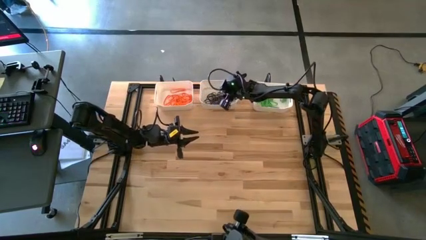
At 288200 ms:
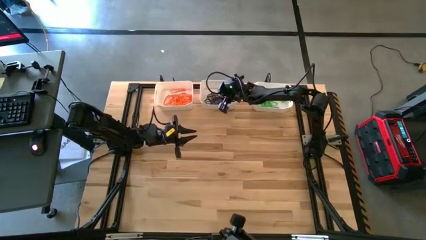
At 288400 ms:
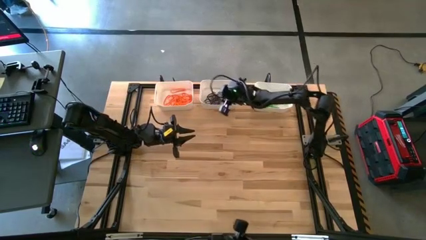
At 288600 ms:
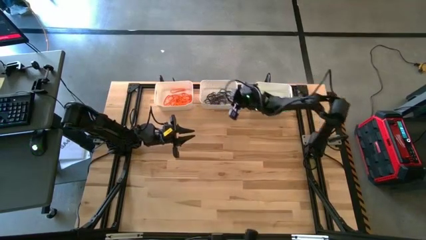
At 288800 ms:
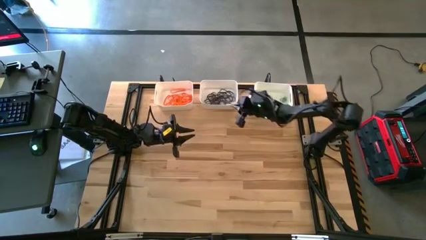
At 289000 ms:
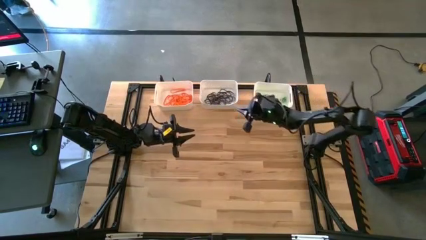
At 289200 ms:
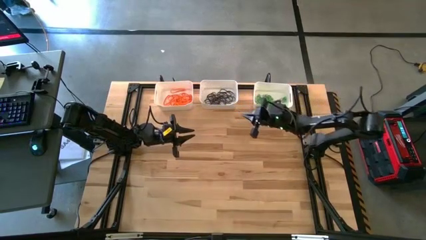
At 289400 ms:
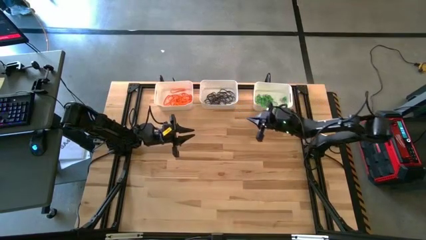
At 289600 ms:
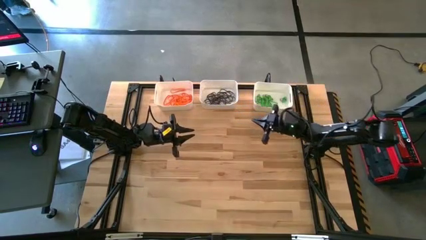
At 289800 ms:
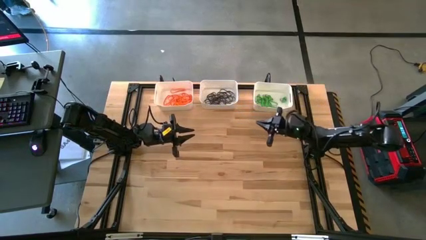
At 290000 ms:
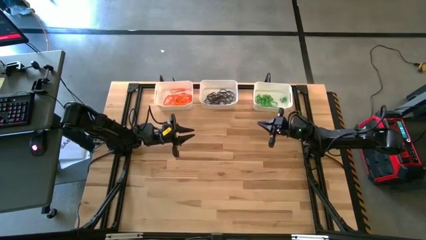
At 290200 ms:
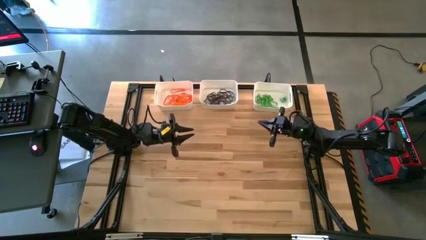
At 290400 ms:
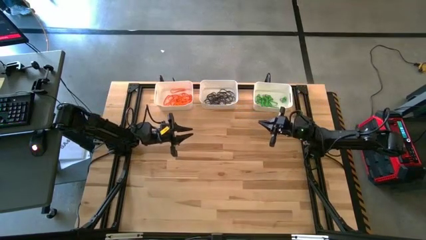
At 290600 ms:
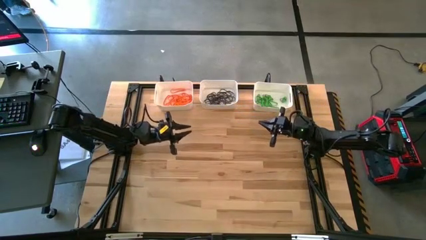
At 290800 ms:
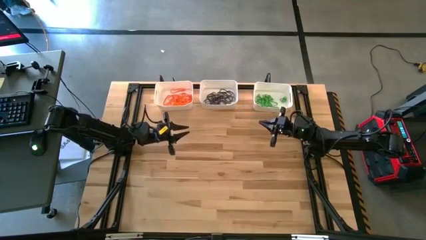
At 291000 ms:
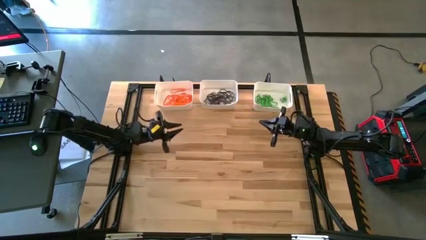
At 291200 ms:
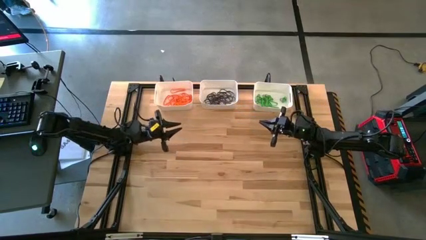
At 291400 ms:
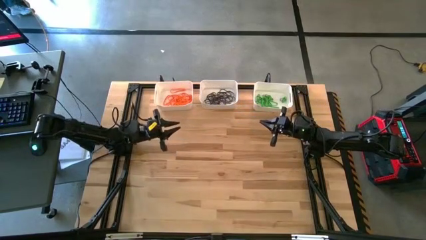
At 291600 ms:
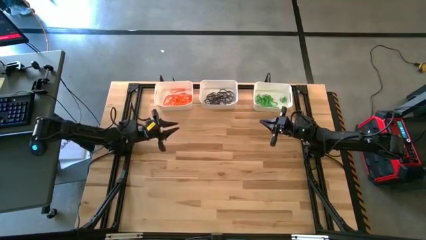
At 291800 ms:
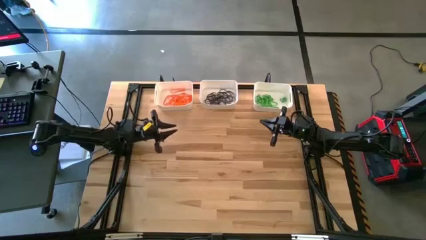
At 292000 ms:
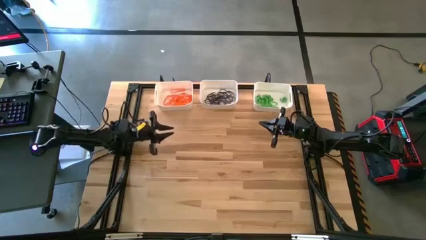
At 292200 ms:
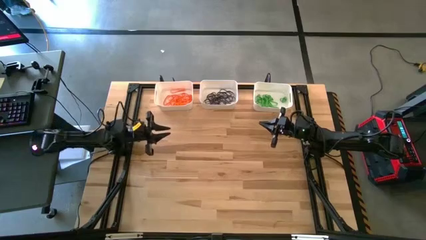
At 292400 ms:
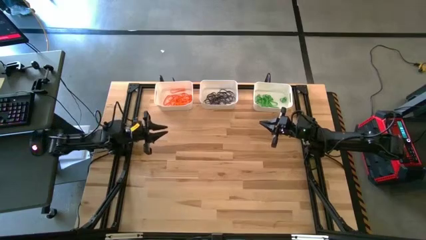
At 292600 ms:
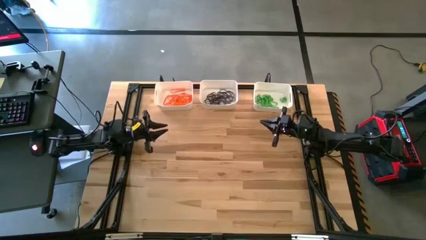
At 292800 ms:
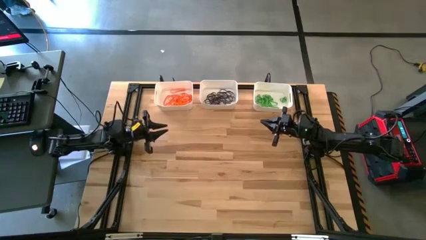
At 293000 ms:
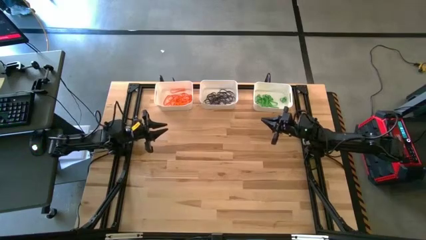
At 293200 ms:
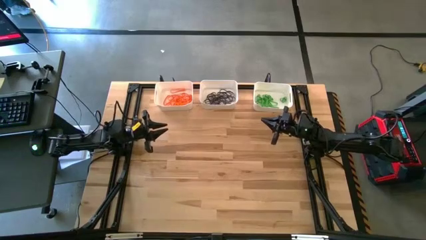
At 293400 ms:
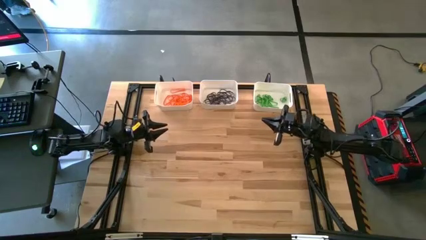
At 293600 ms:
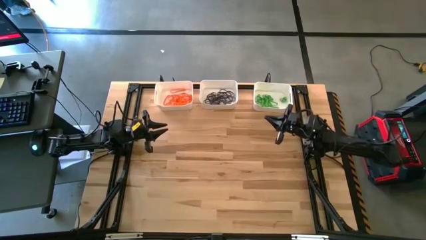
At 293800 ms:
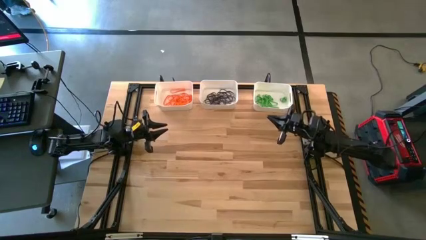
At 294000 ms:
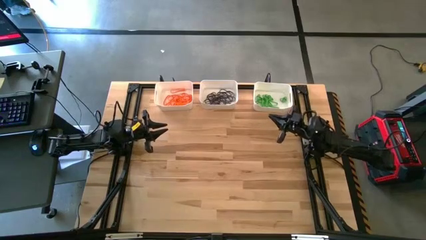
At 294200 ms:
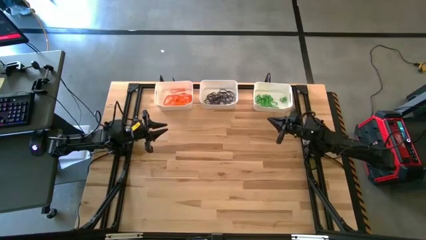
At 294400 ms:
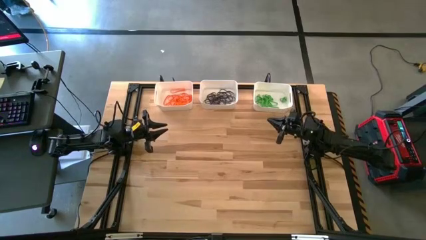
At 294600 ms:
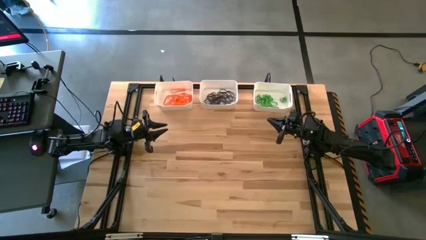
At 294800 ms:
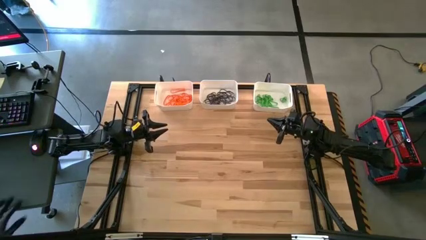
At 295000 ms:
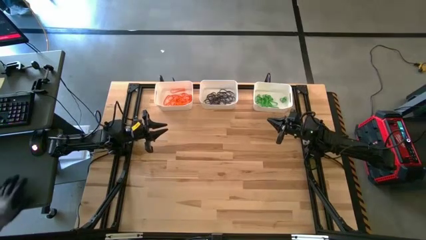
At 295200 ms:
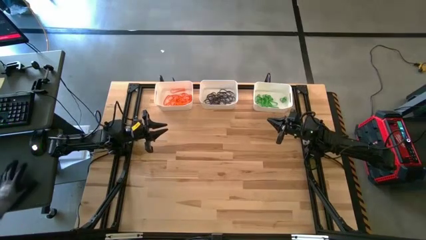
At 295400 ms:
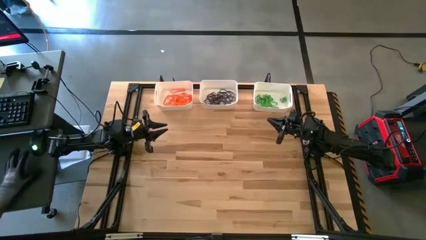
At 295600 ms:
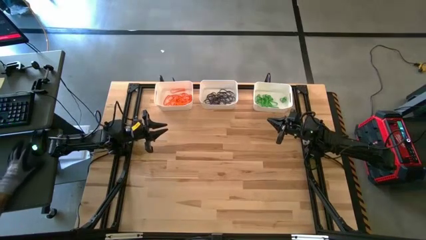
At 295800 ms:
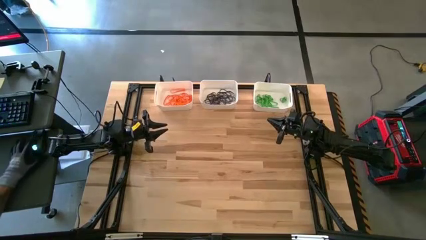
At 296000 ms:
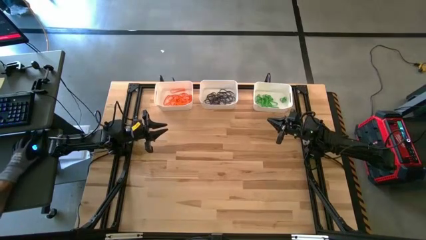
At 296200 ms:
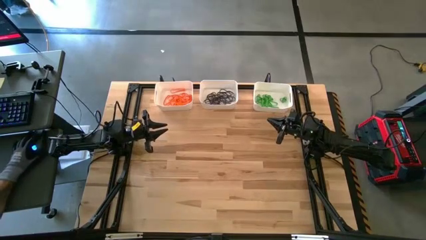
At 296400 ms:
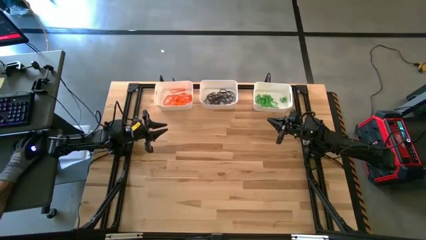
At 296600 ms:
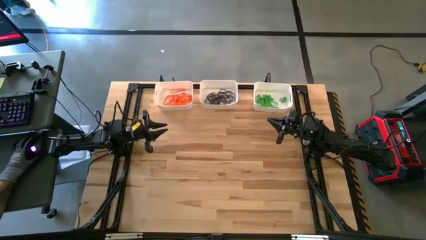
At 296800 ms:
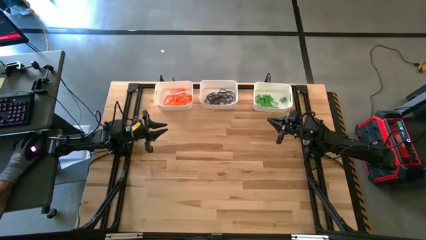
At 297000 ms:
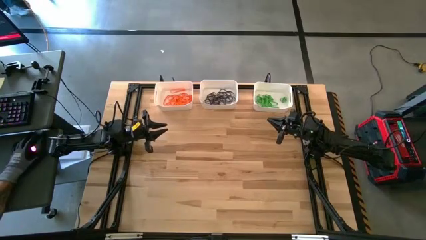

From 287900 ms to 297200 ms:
Task: Sort rubber bands into baskets
Return to Home Position

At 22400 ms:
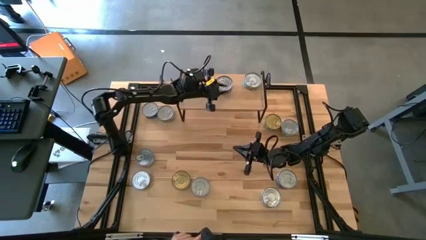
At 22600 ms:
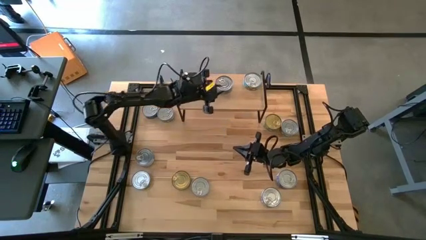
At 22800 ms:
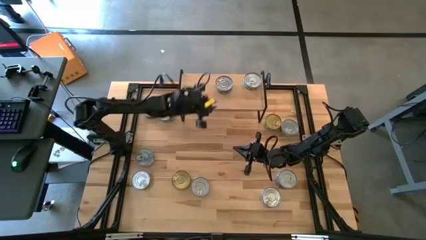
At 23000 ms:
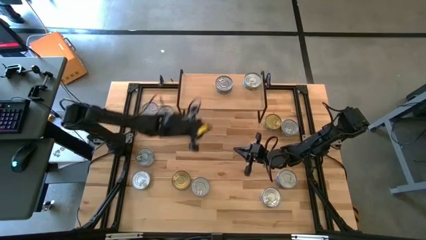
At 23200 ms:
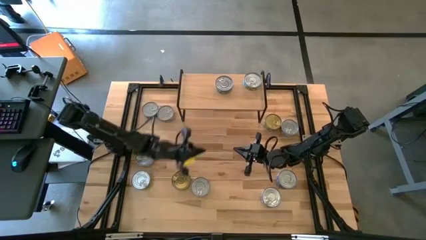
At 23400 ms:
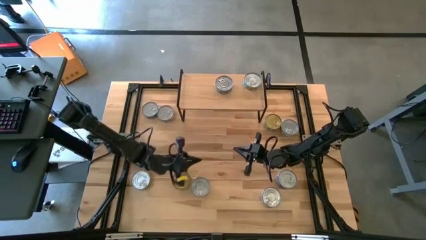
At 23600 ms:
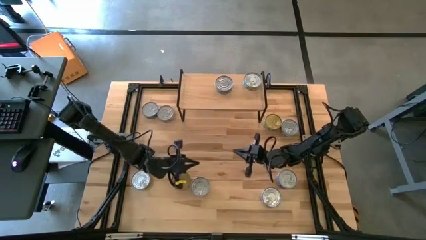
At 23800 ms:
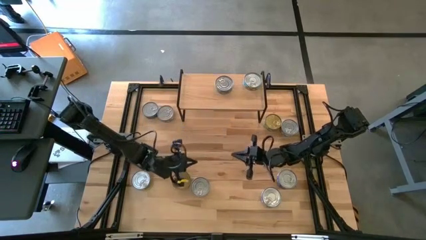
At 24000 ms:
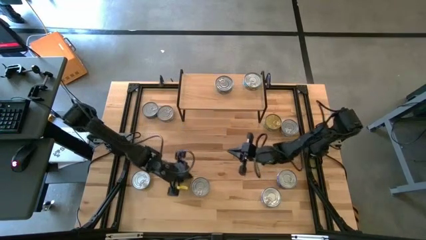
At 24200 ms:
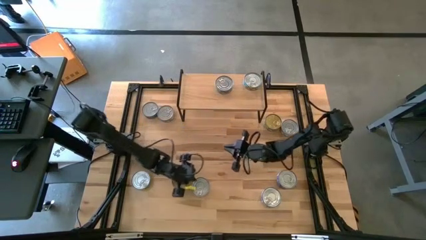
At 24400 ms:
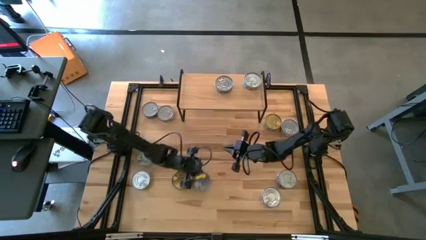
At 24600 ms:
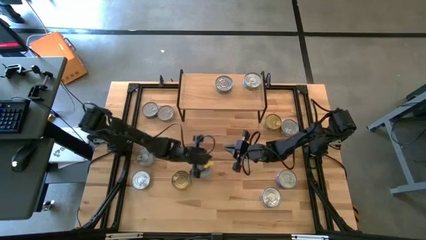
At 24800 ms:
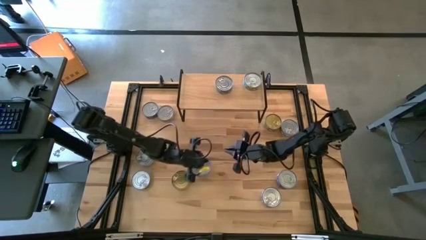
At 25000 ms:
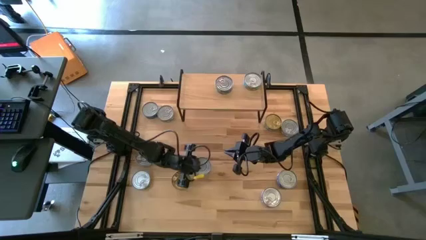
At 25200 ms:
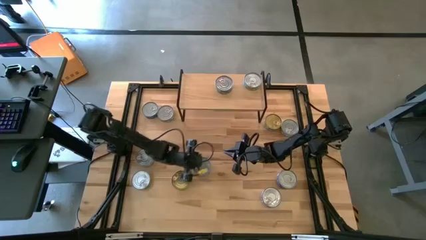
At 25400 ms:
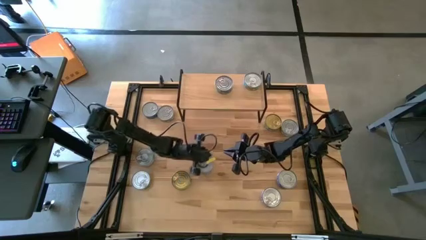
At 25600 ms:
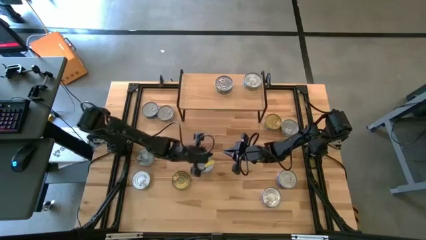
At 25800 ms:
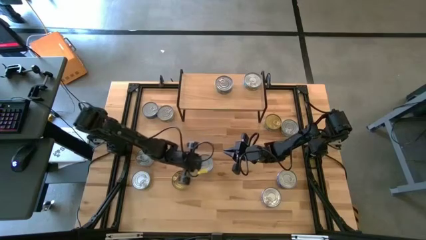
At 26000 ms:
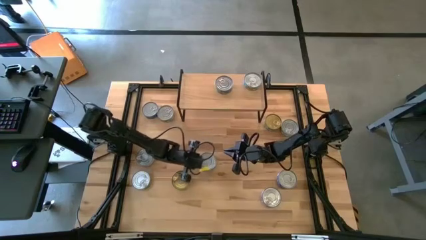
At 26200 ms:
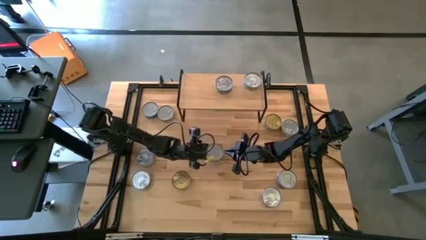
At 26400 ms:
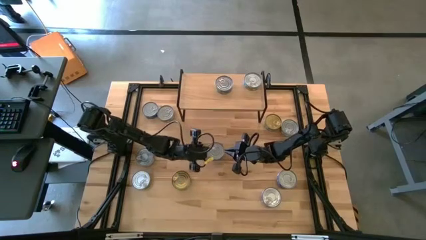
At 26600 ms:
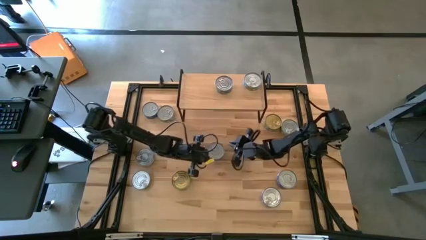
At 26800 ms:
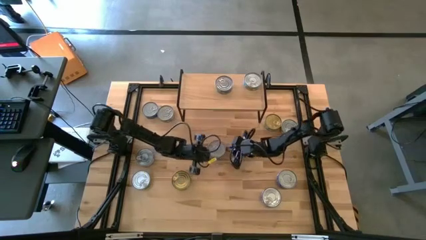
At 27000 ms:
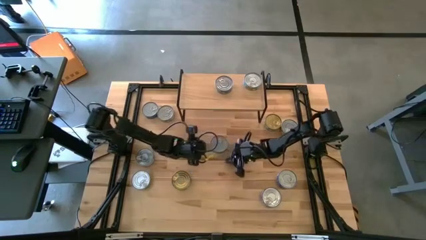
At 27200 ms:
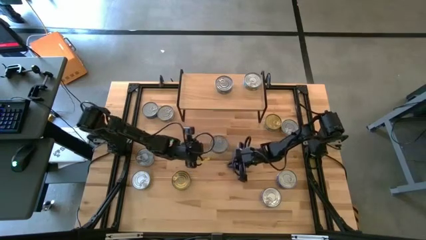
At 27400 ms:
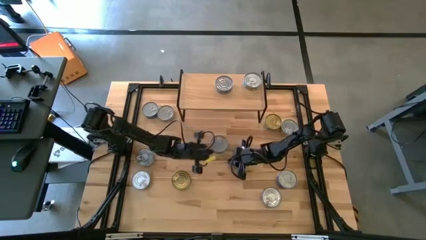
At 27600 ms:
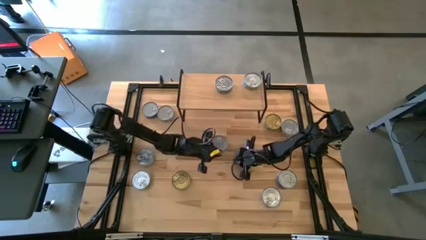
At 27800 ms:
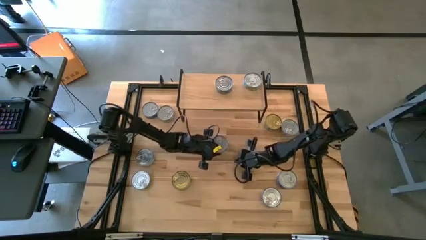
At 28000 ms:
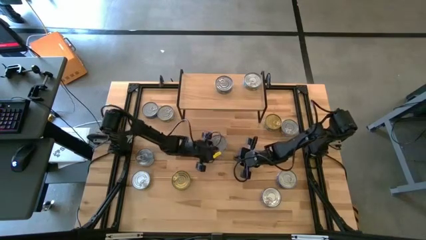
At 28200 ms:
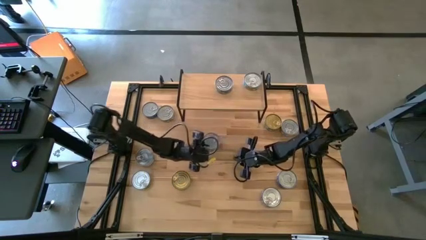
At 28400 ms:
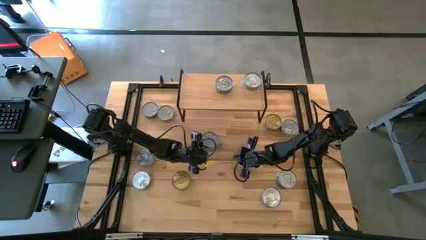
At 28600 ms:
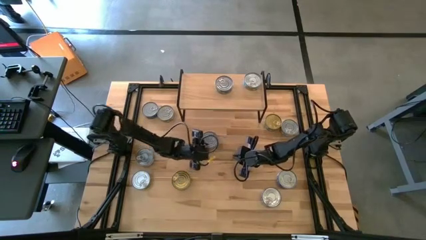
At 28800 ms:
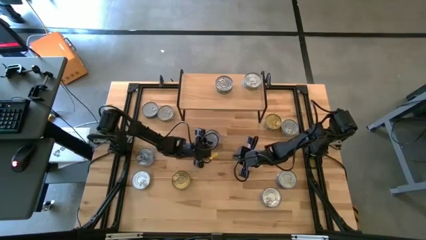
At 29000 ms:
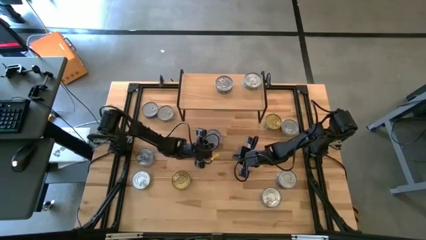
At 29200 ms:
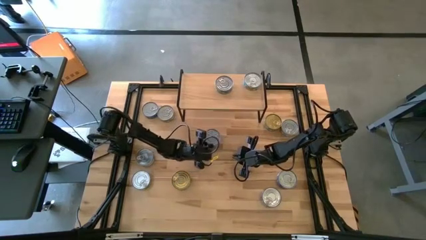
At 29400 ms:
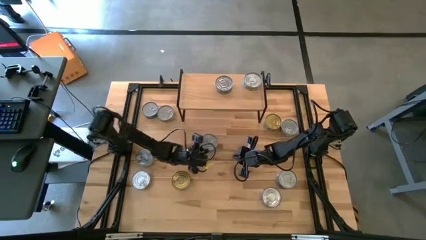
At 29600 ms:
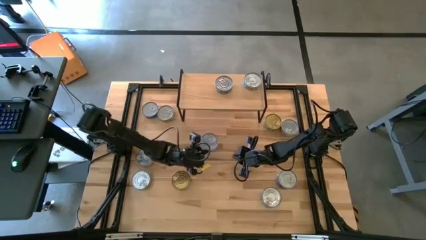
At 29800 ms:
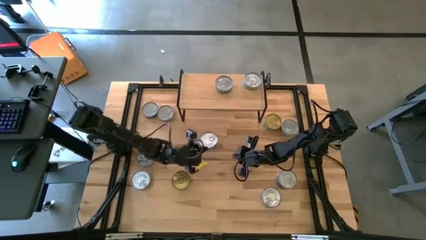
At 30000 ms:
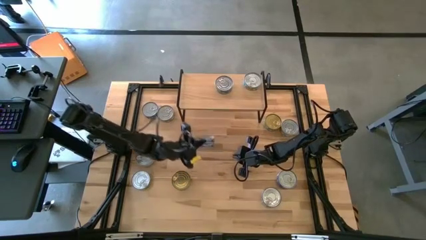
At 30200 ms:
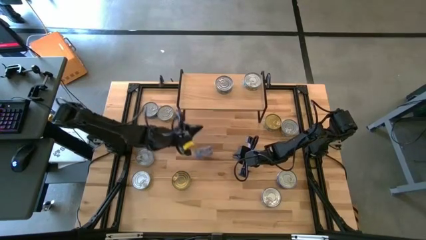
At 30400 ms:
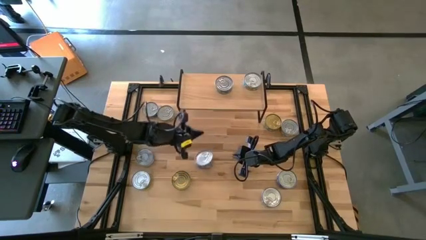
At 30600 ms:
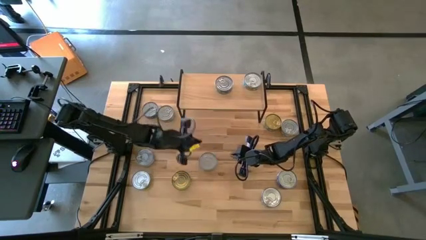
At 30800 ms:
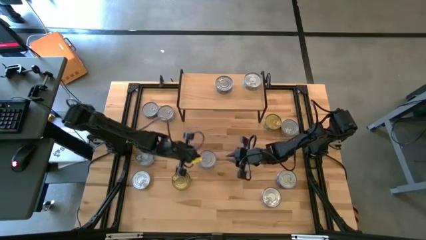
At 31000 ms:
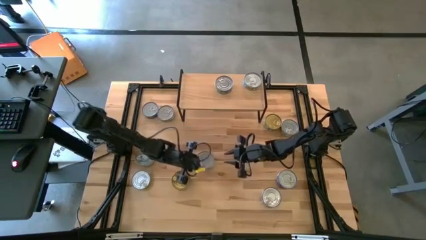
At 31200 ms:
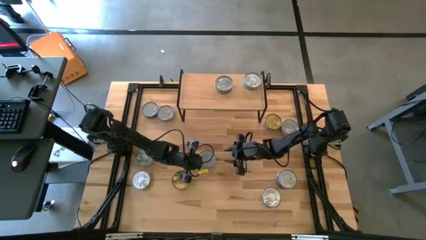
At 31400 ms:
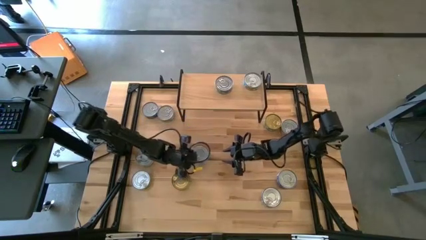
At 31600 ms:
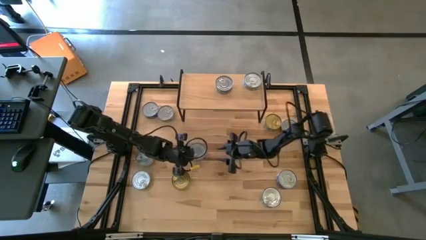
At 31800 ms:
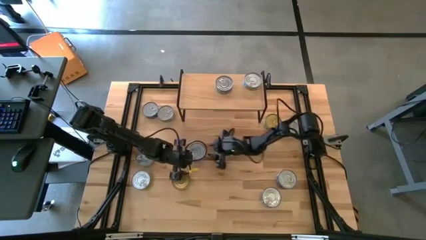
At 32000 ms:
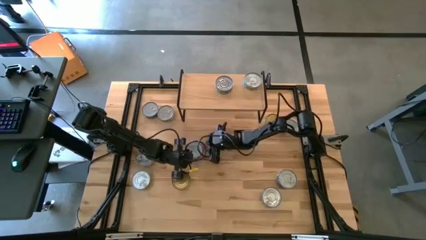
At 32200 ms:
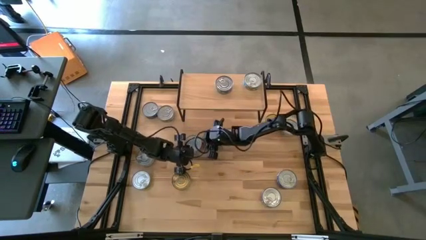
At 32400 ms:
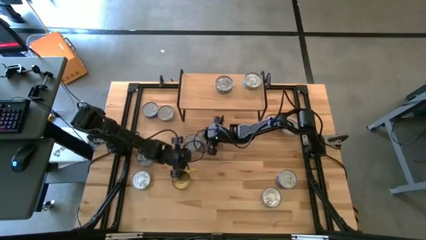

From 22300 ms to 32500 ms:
Task: Stack canned seafood by type on shelf
Put the blue tuna can on the shelf
